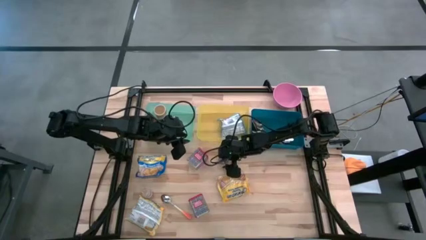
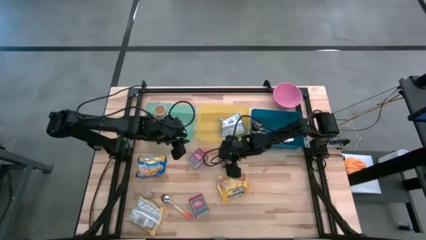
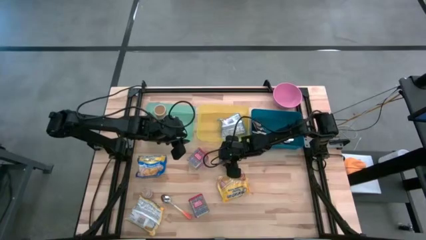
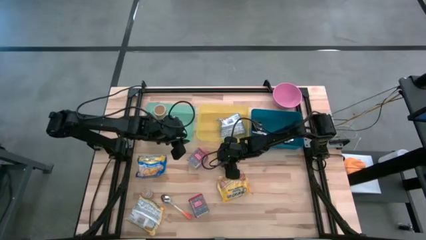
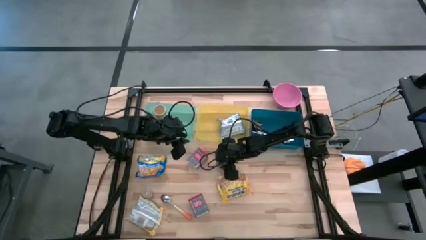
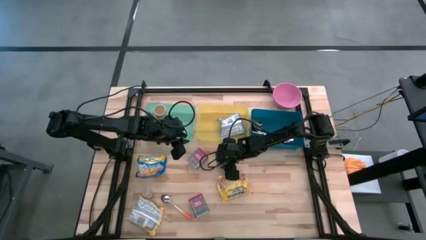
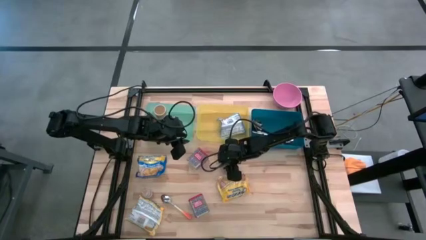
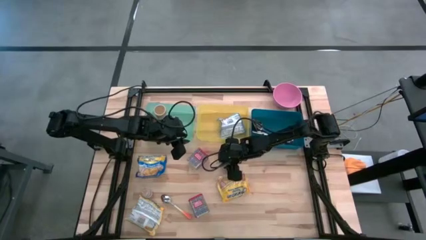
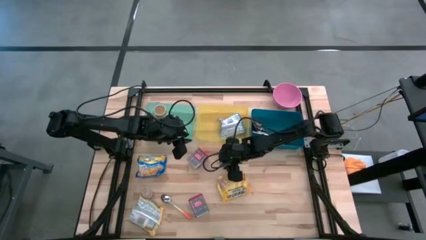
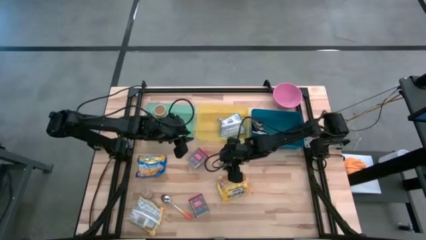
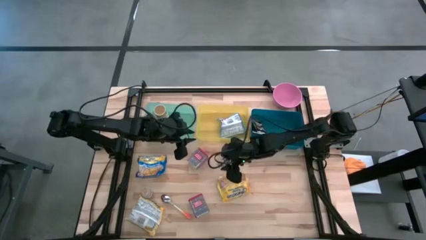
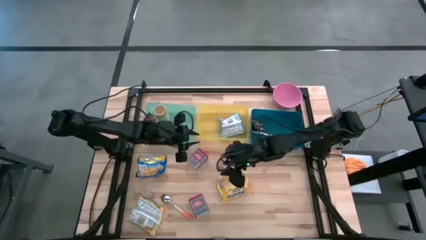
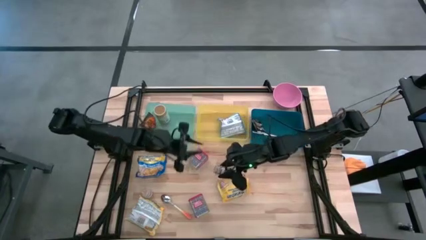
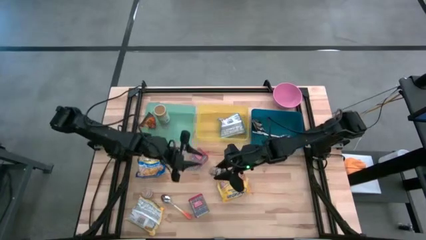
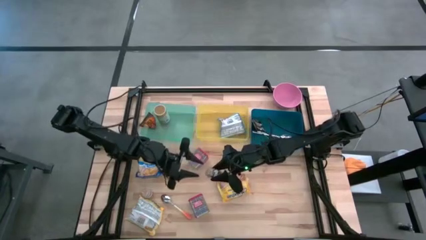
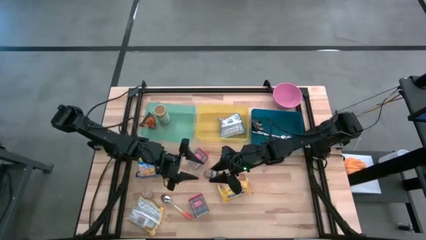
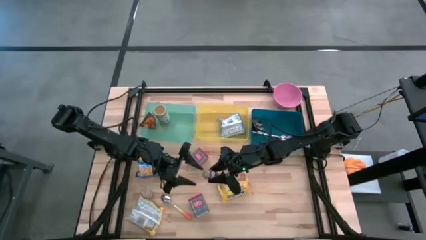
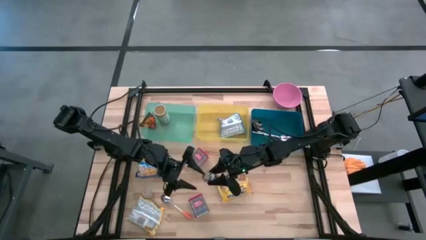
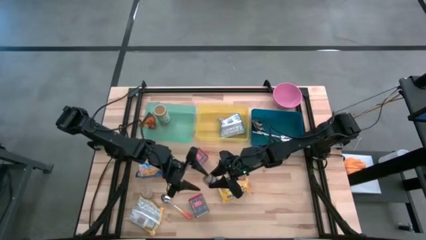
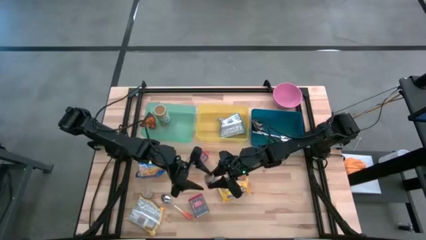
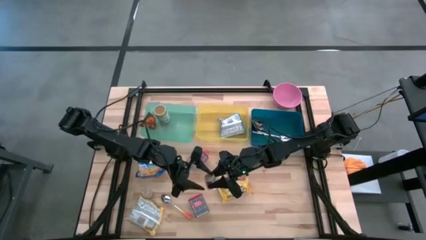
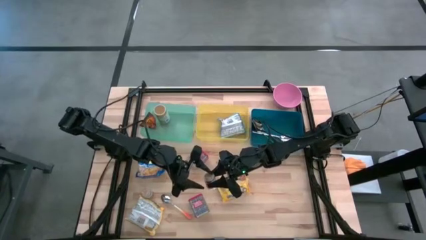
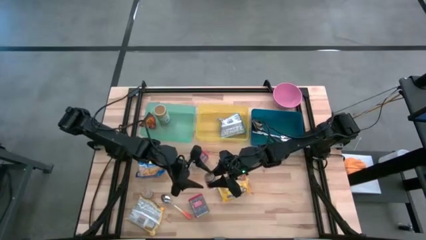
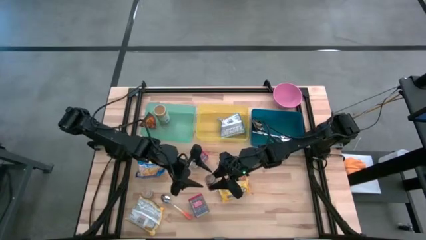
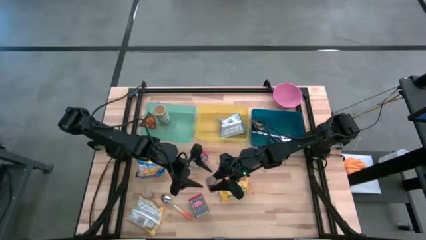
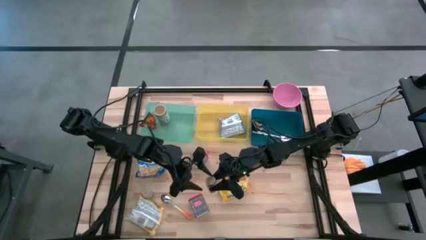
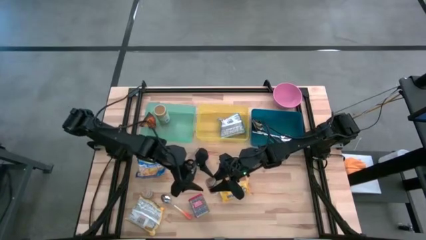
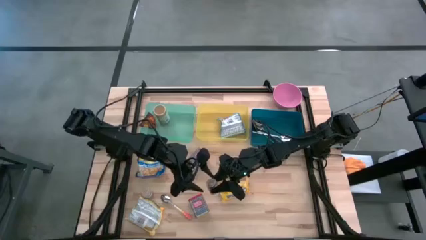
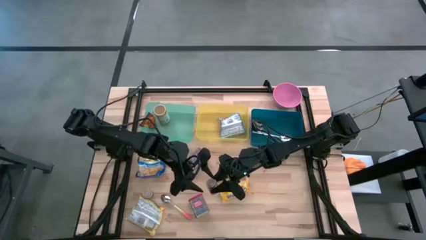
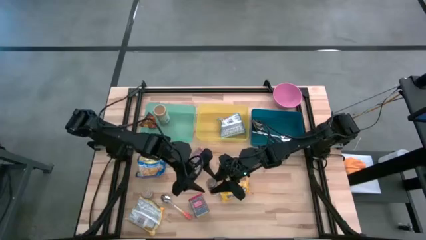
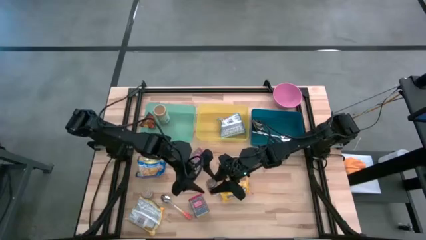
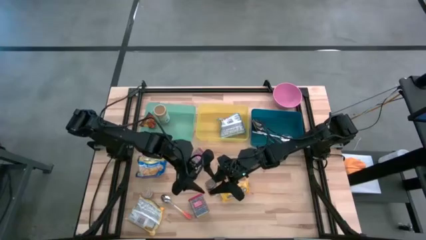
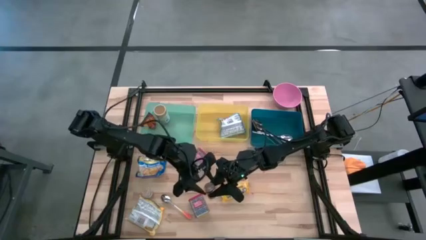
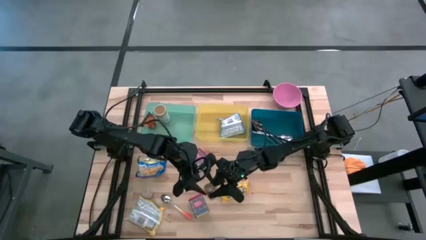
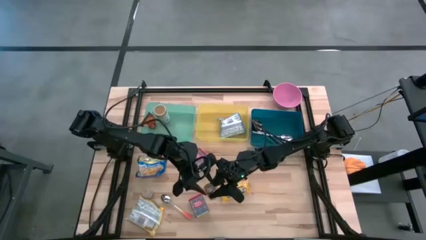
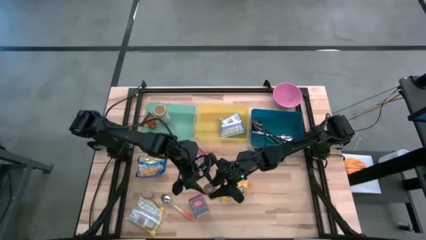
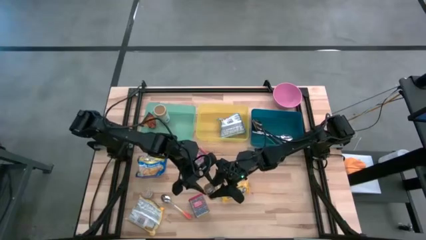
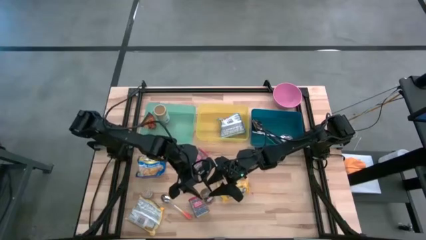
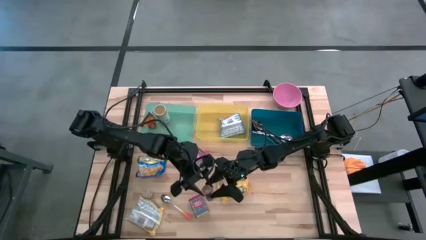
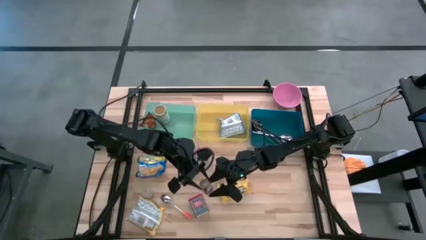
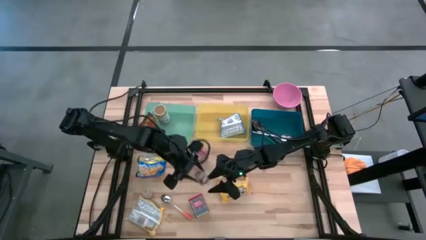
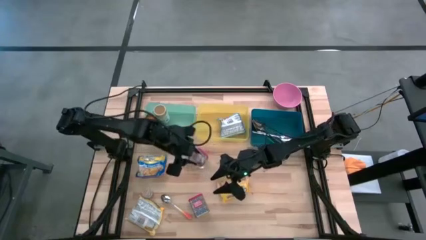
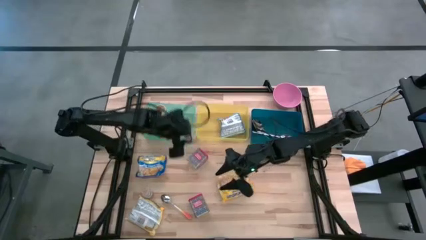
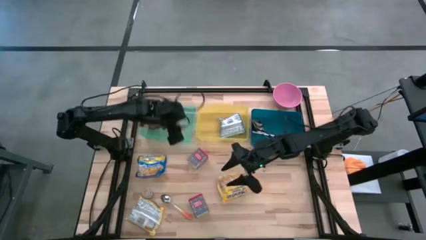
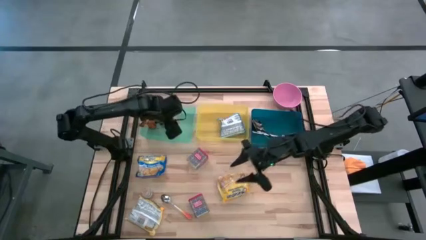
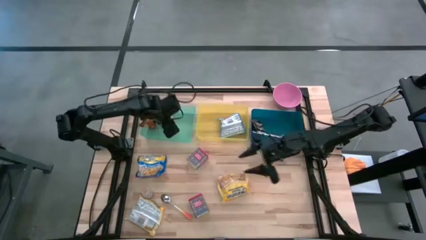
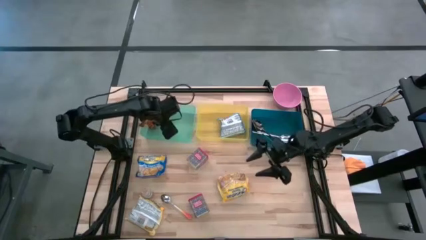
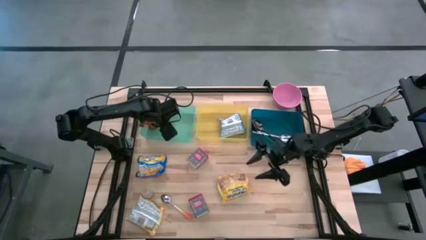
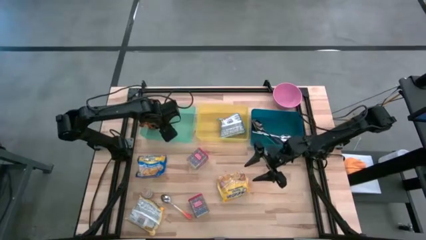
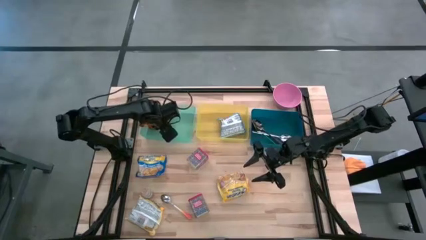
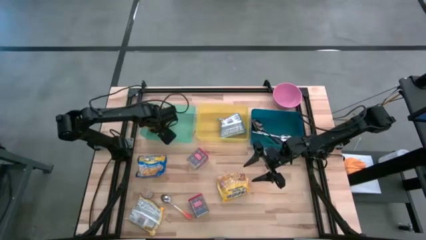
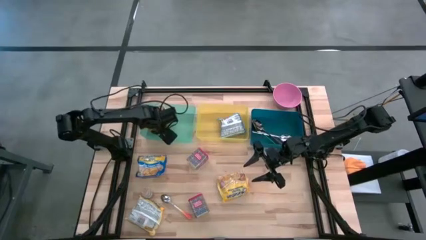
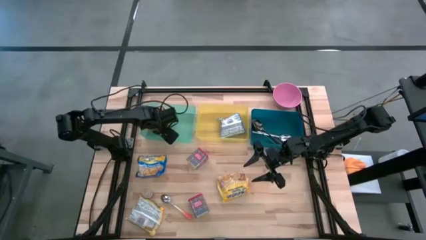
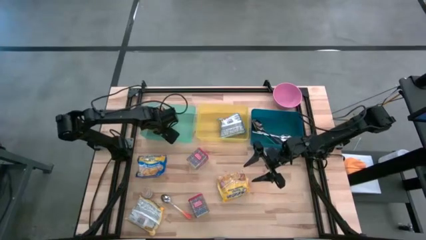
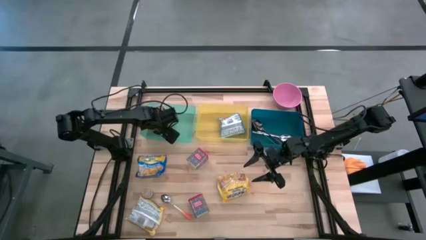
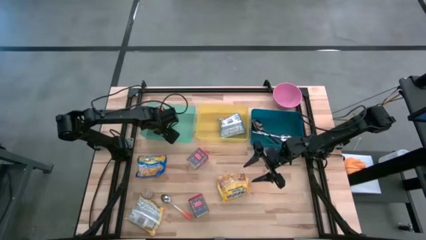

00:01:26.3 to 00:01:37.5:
Put the brown seasoning bottle into the green bin
